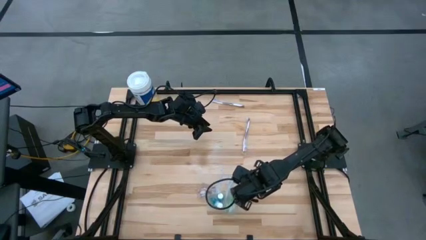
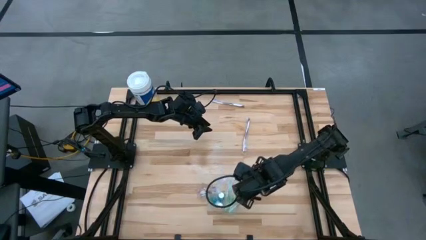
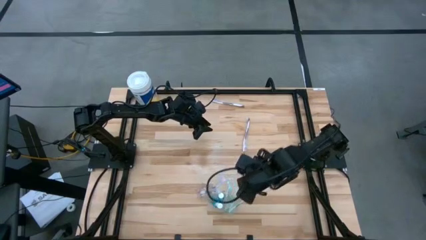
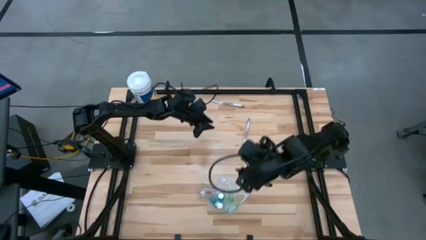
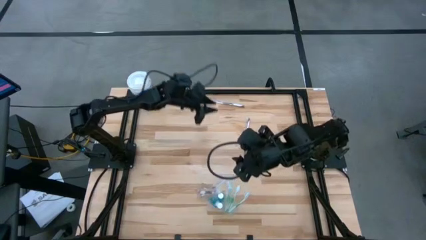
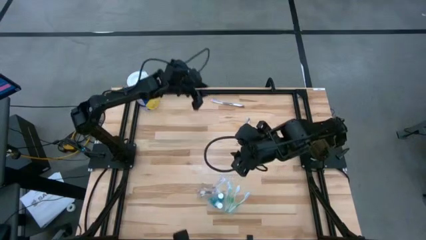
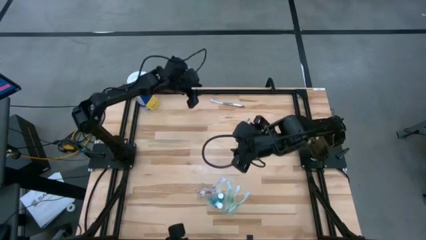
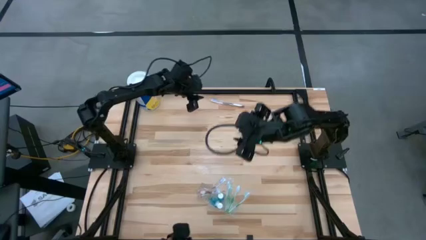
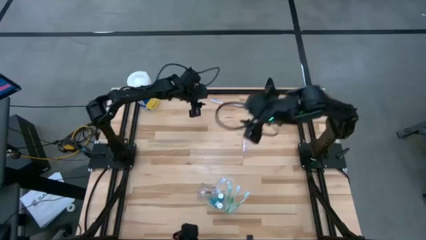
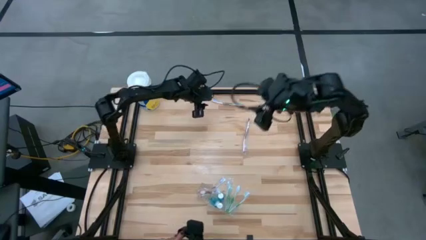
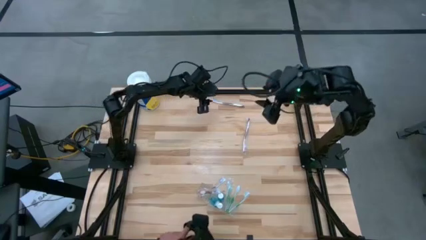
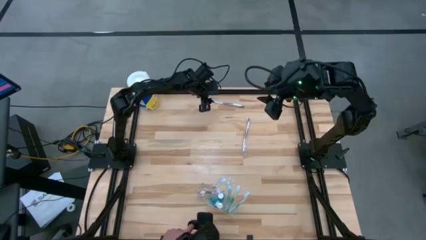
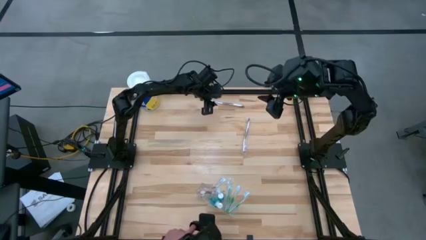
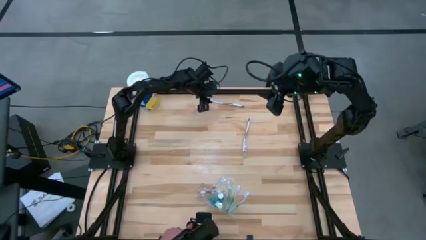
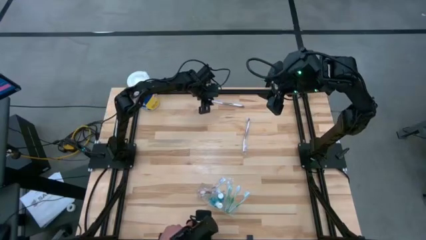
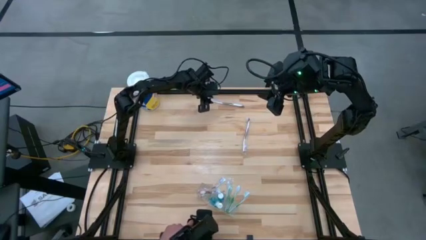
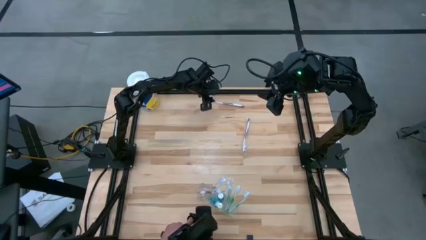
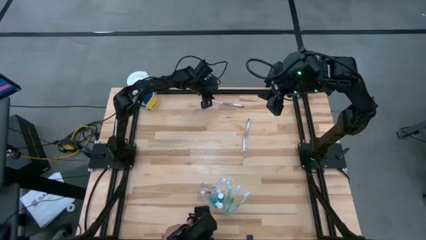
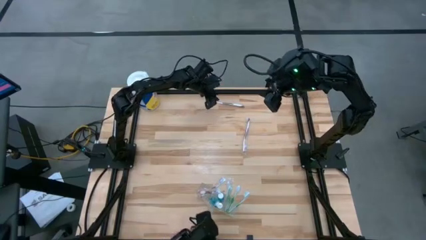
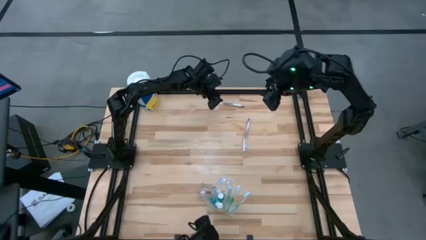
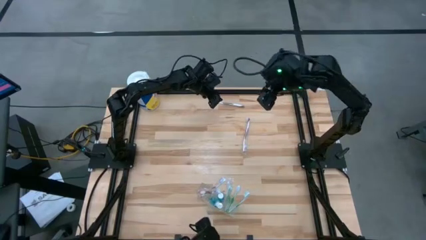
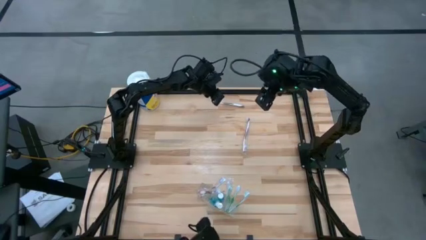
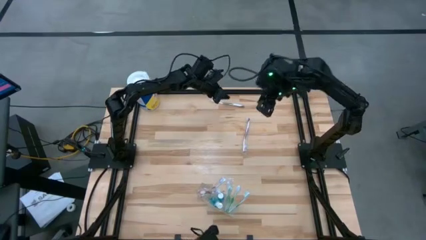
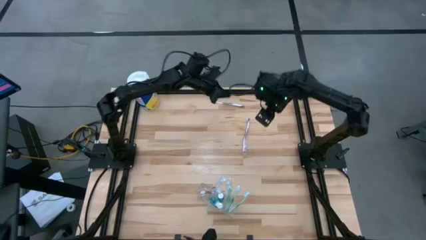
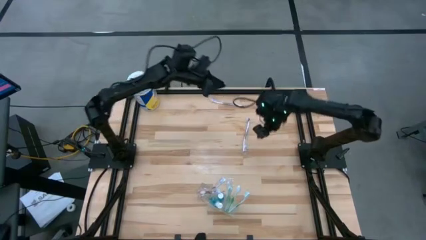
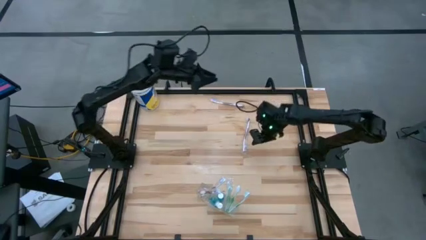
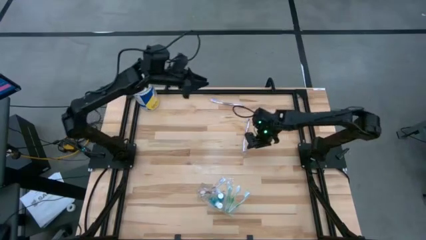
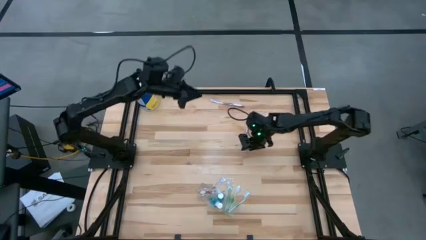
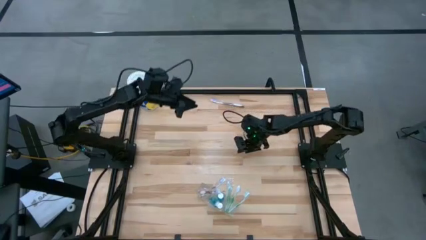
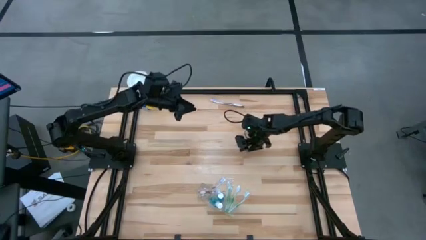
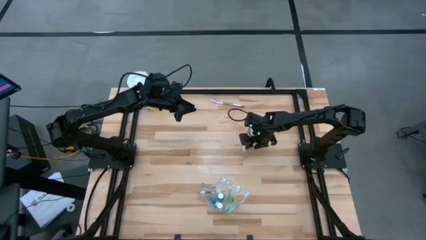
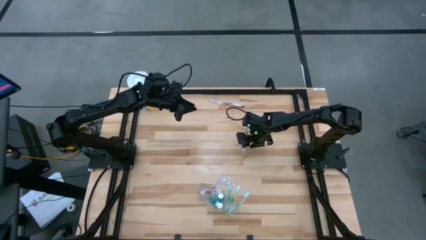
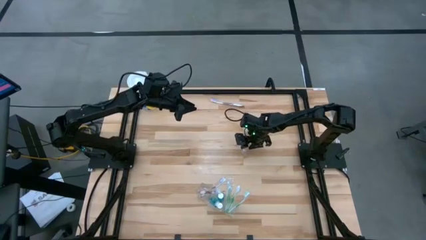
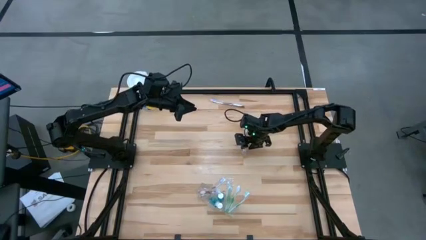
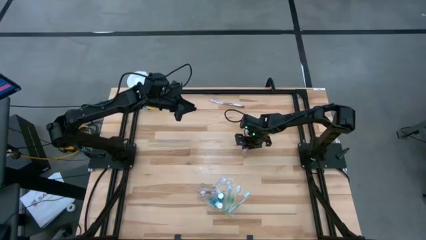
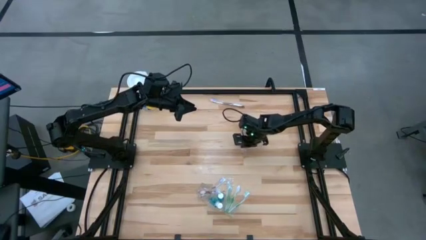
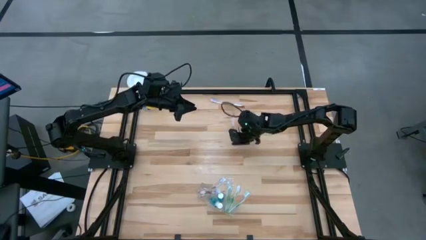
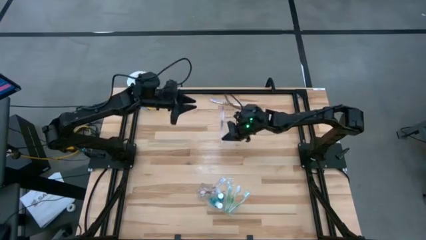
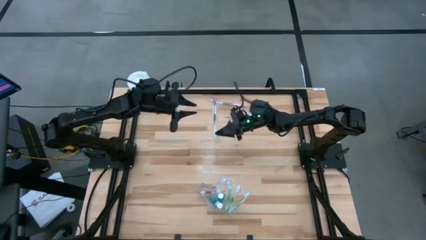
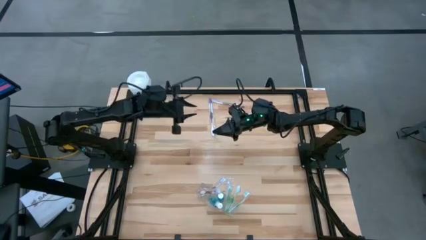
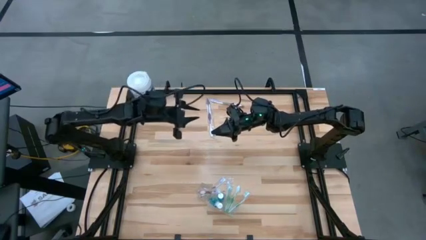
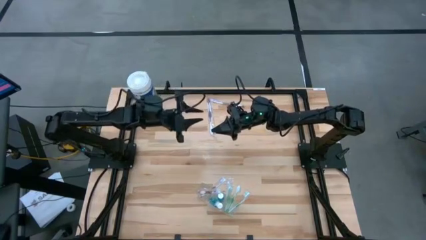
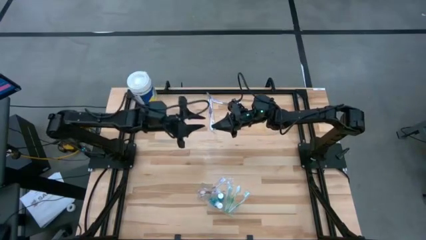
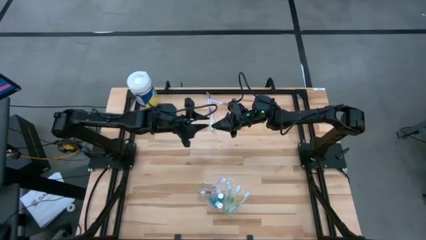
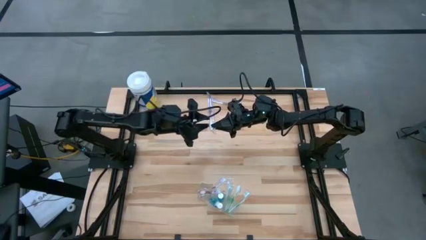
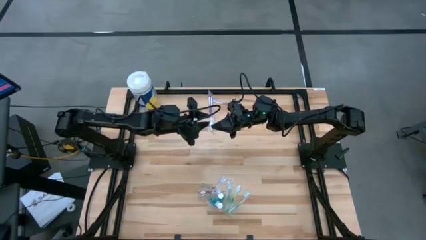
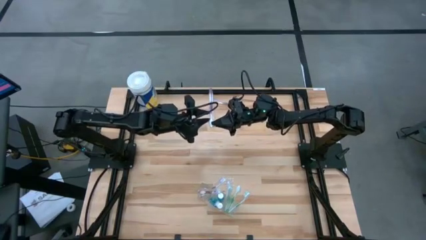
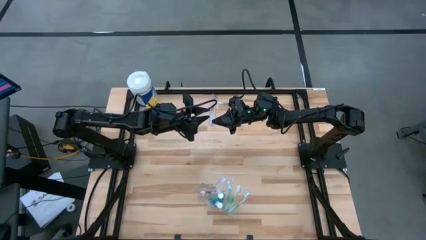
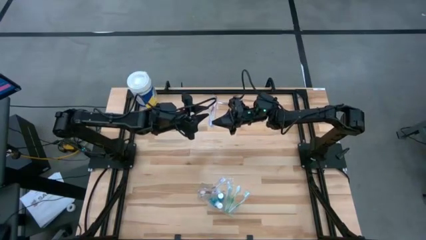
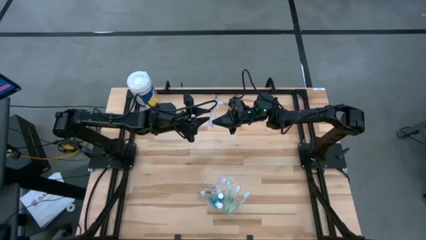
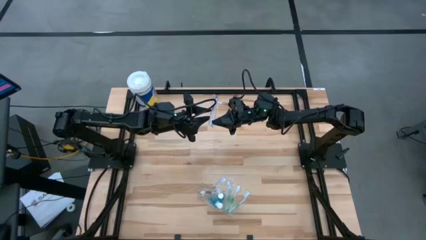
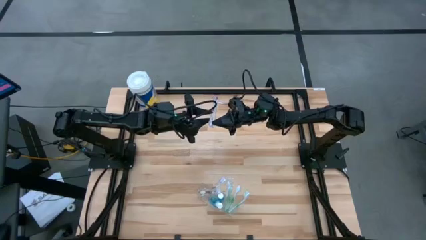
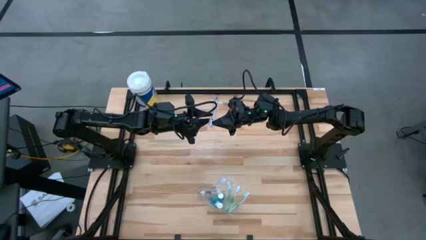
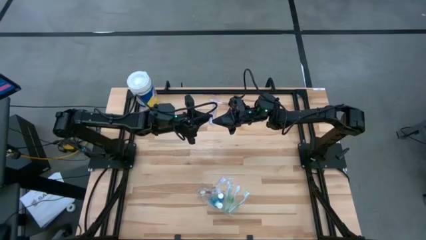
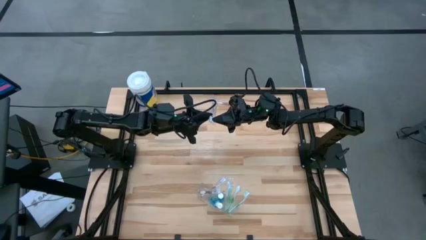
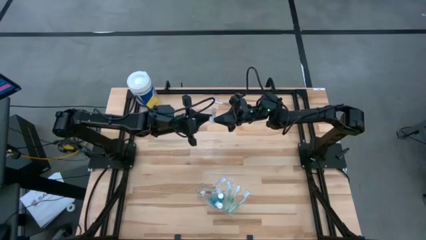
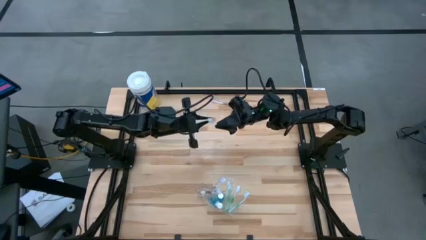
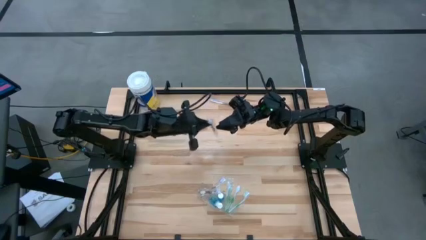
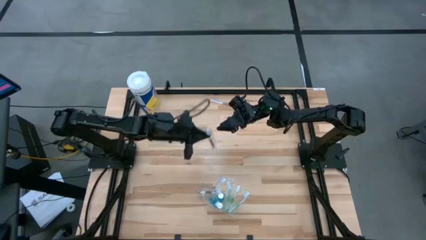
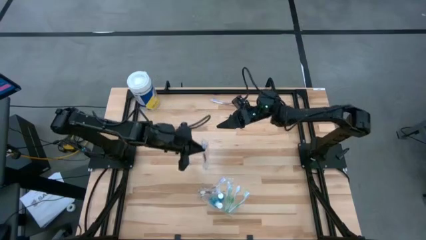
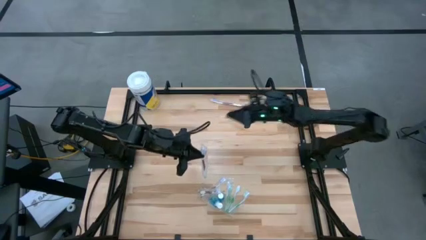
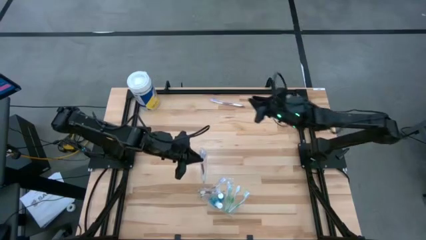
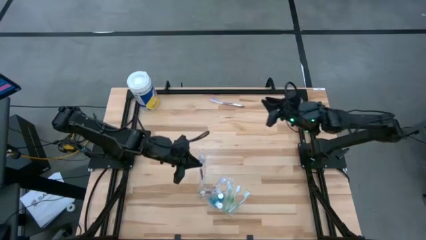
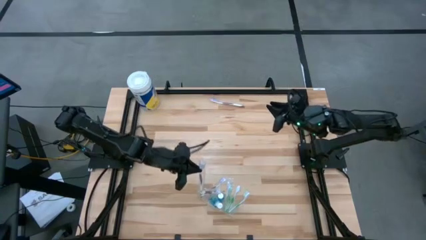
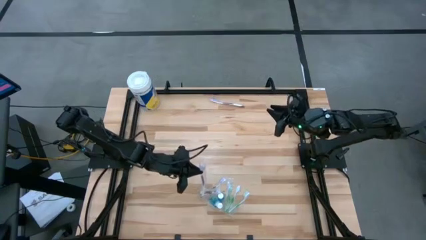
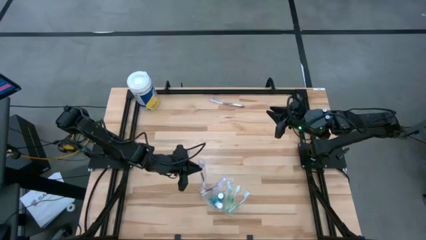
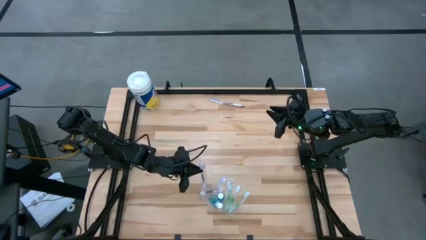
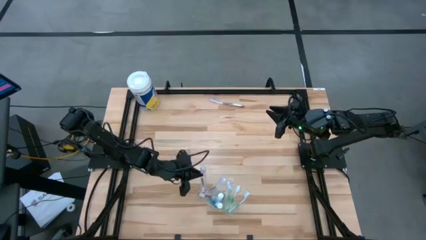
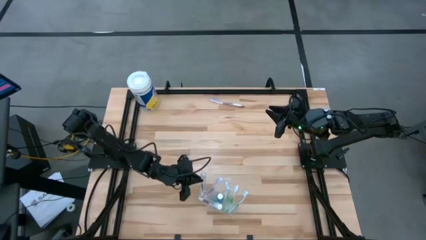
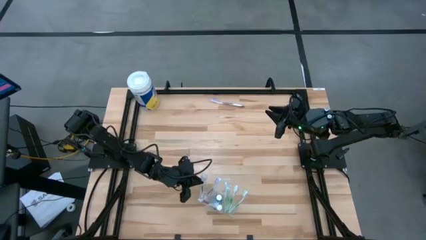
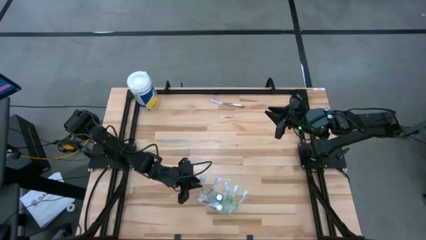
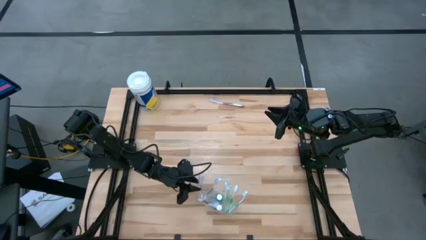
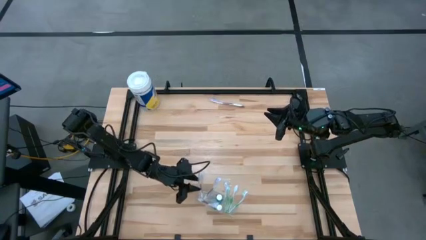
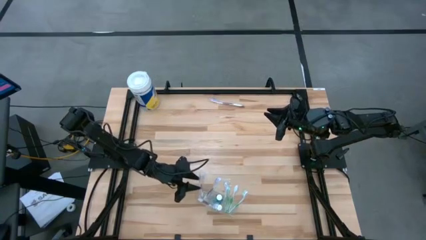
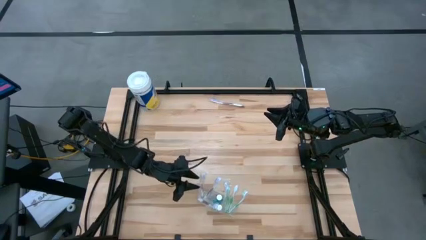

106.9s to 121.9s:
Task: Pick & Place toothbrushing station
Put the purple toothbrush in the transparent organizer

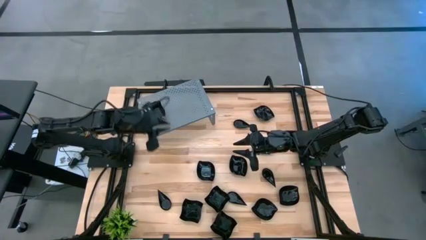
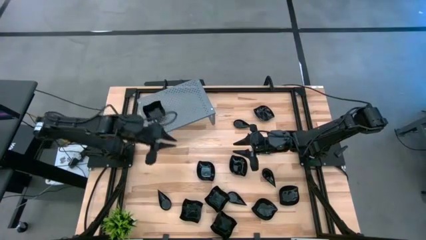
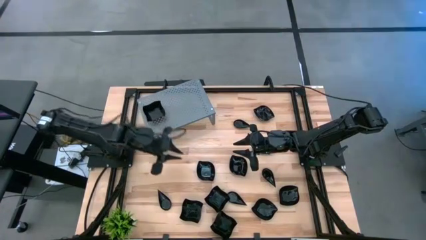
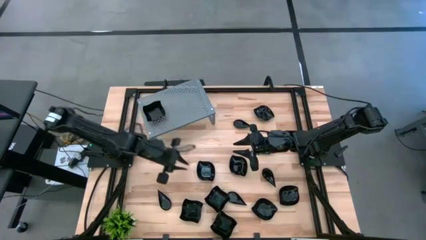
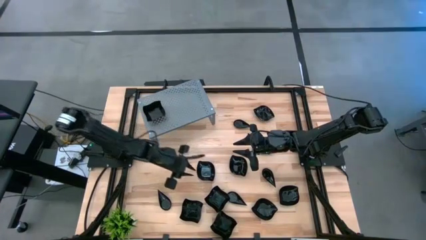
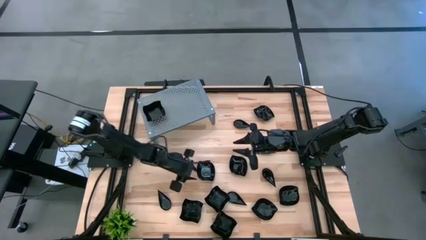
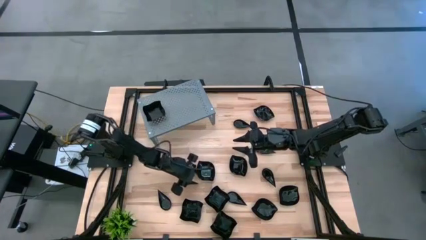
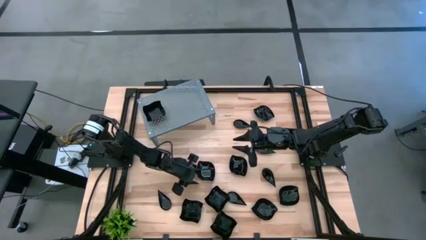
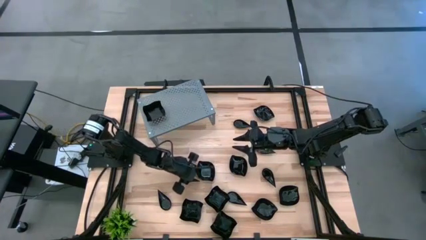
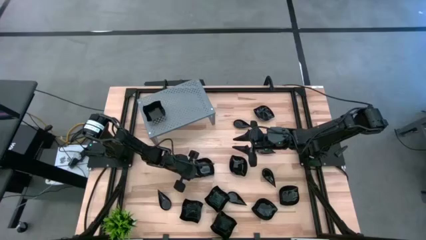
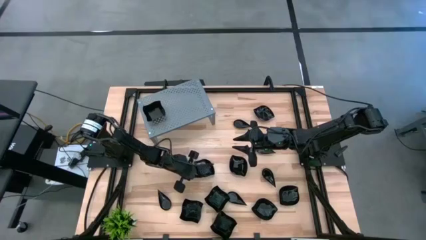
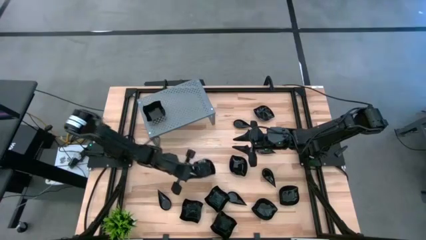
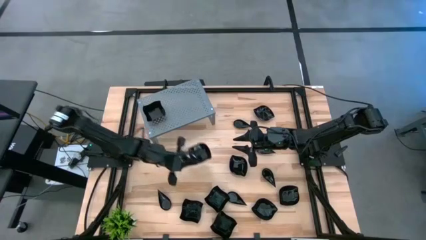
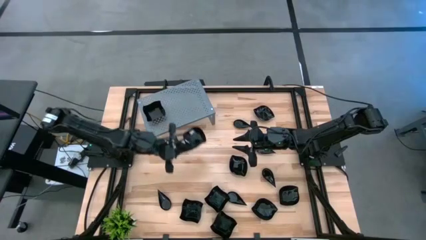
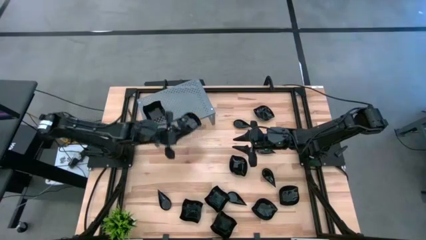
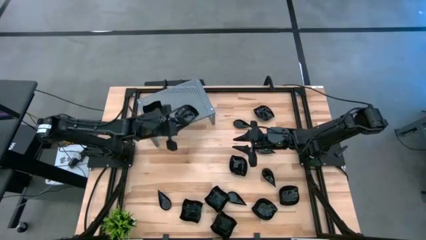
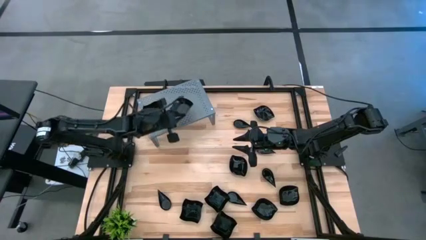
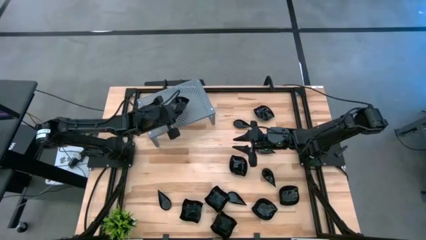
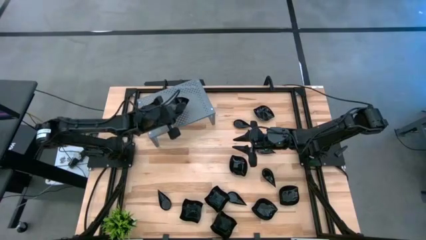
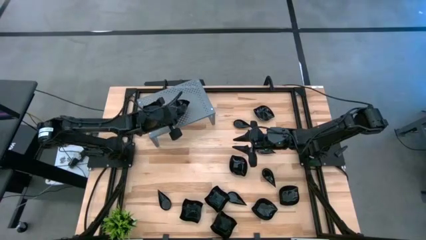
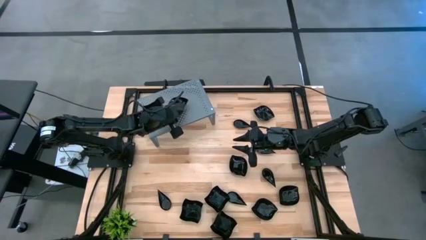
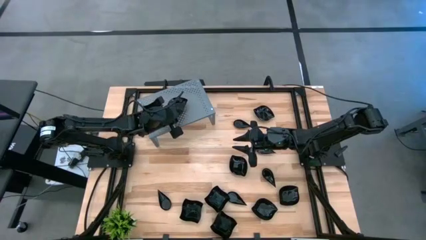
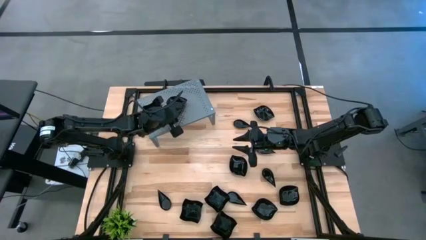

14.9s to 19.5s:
Task: Pick & Place Mini shaped plates
Put the black leaf shaped plate on the shelf
